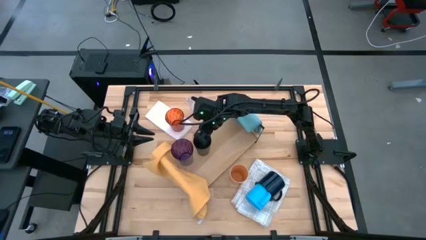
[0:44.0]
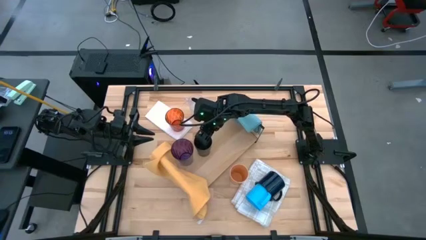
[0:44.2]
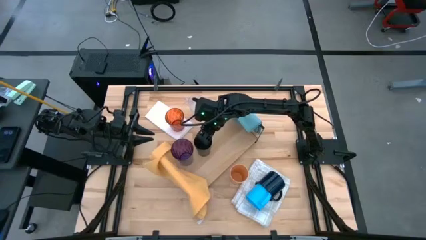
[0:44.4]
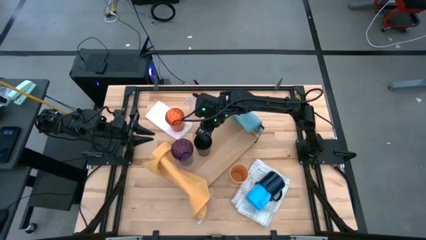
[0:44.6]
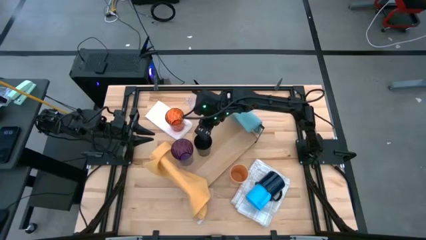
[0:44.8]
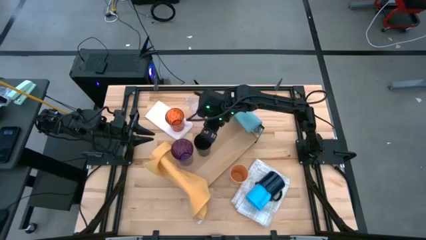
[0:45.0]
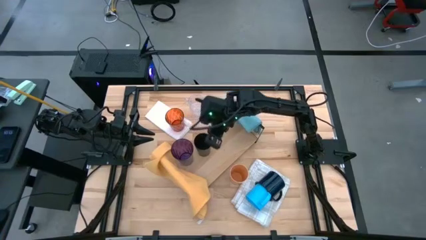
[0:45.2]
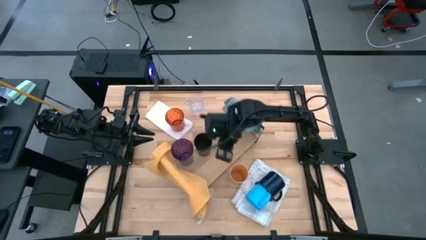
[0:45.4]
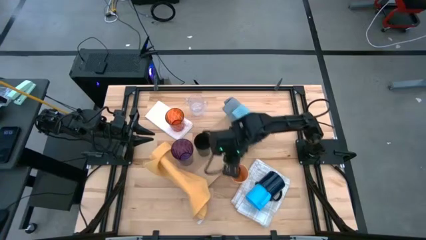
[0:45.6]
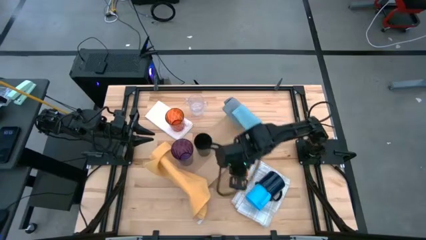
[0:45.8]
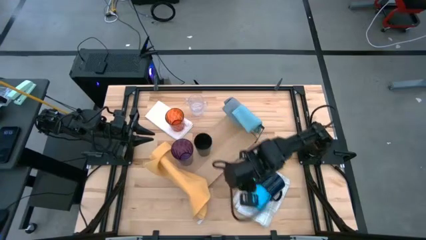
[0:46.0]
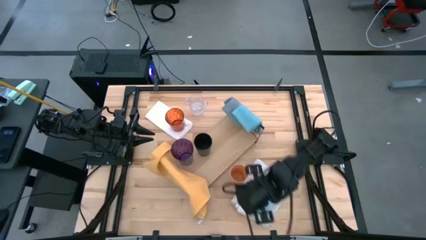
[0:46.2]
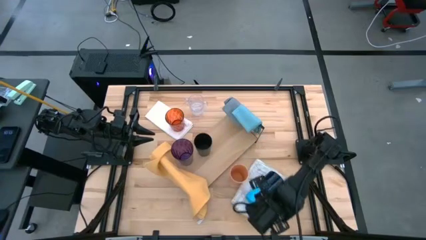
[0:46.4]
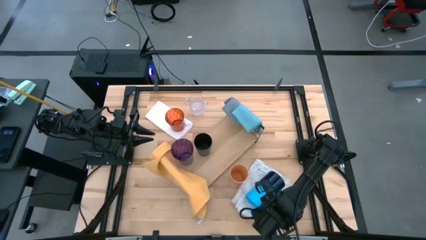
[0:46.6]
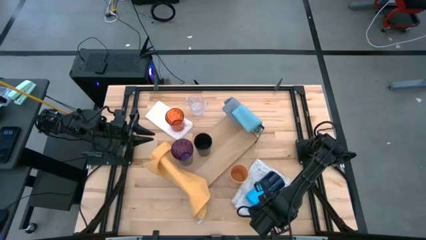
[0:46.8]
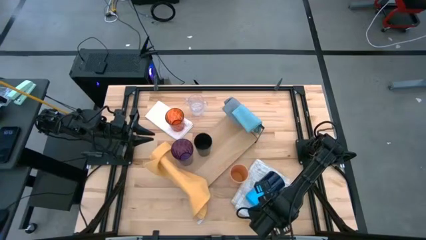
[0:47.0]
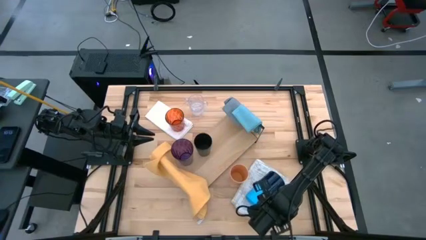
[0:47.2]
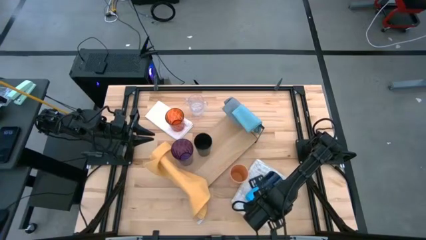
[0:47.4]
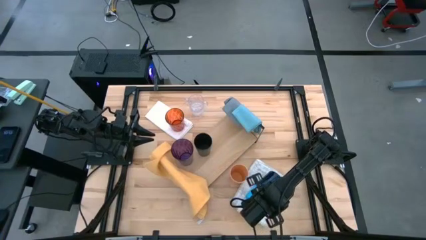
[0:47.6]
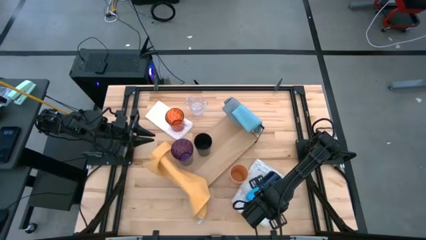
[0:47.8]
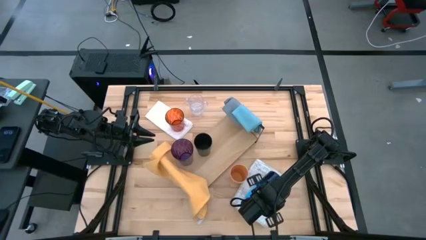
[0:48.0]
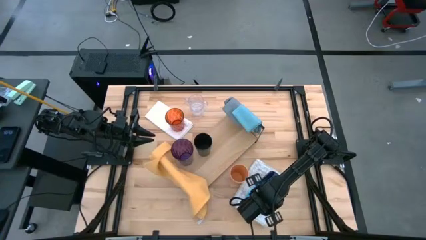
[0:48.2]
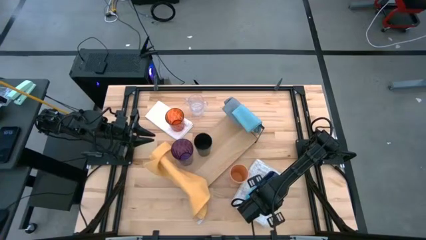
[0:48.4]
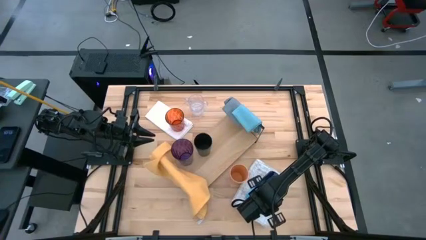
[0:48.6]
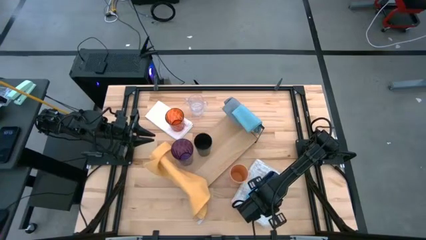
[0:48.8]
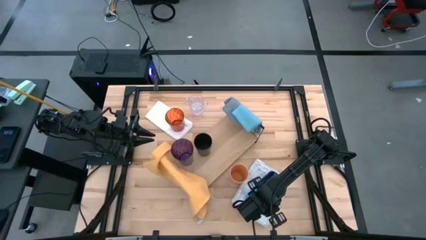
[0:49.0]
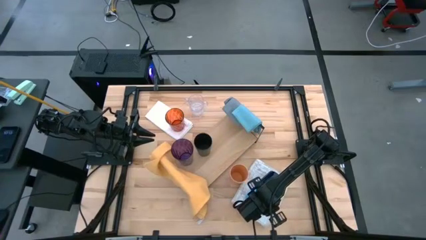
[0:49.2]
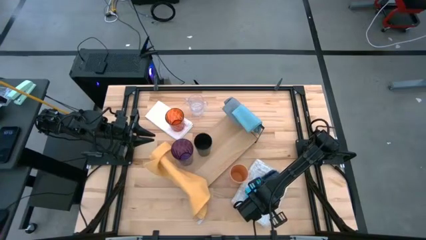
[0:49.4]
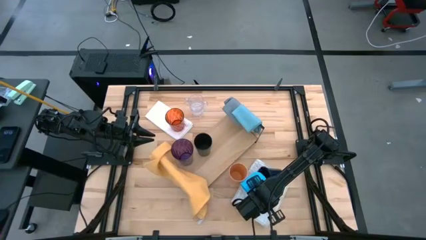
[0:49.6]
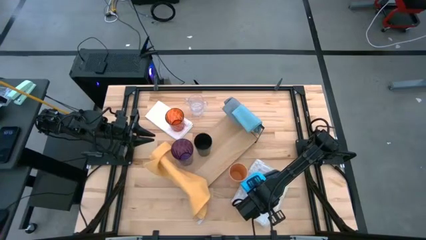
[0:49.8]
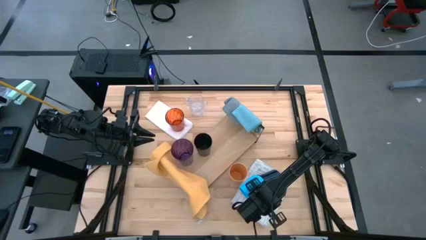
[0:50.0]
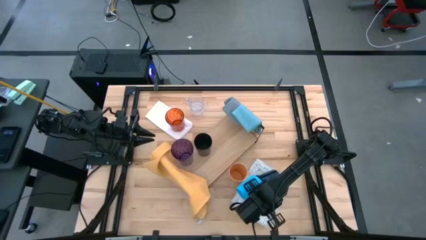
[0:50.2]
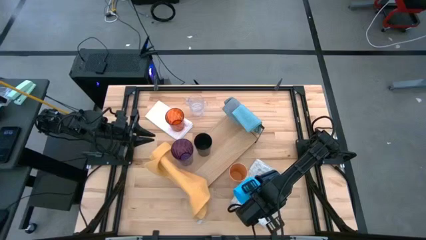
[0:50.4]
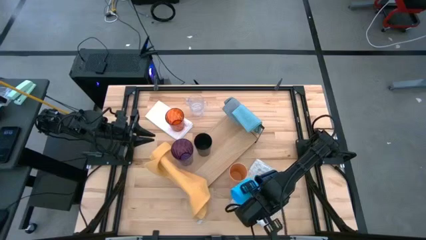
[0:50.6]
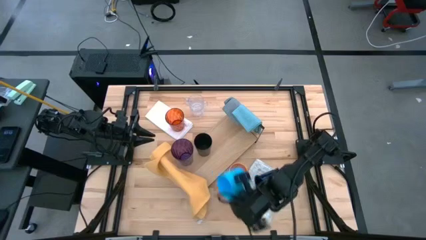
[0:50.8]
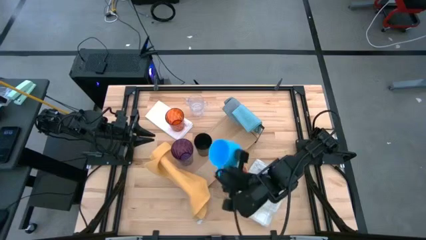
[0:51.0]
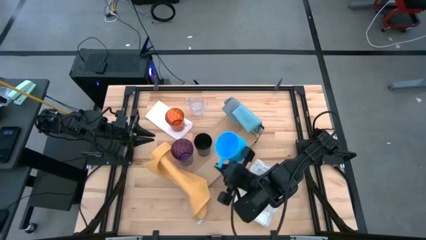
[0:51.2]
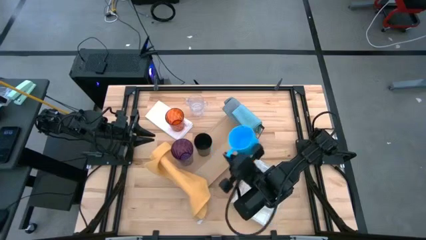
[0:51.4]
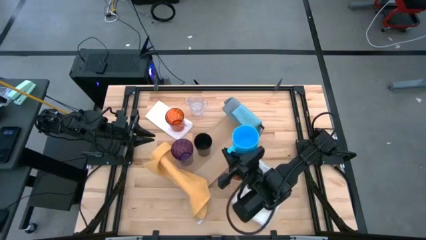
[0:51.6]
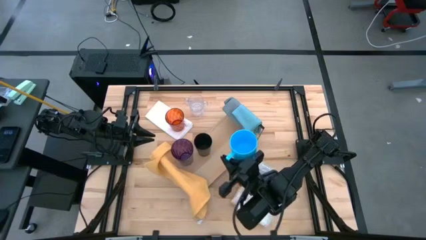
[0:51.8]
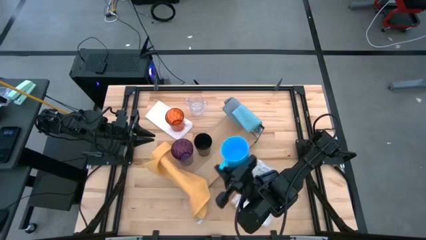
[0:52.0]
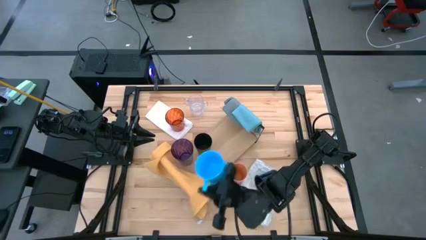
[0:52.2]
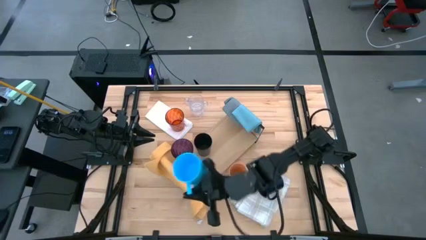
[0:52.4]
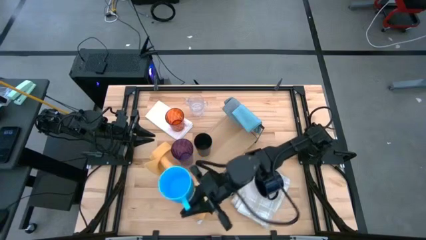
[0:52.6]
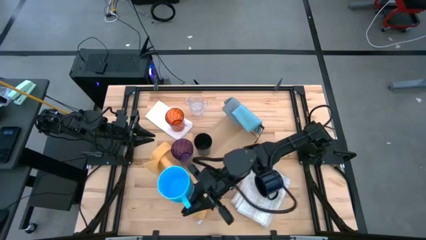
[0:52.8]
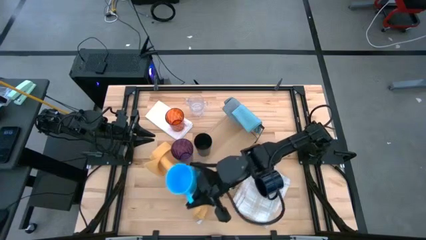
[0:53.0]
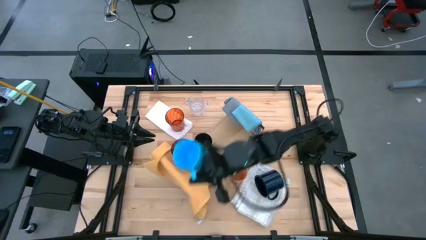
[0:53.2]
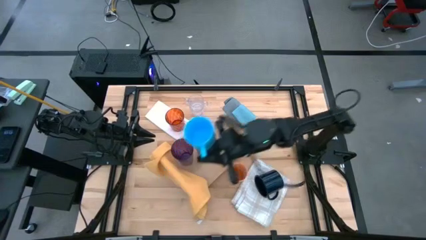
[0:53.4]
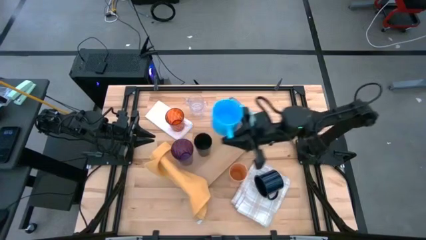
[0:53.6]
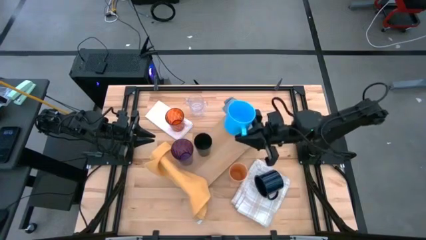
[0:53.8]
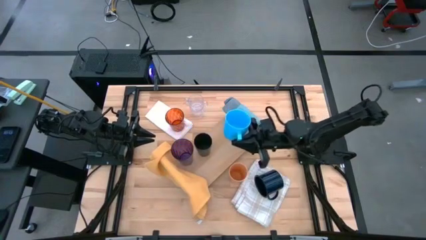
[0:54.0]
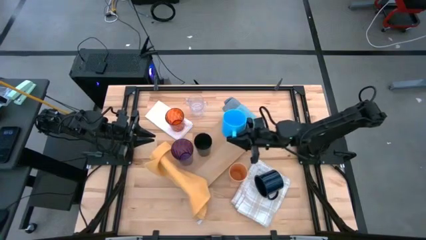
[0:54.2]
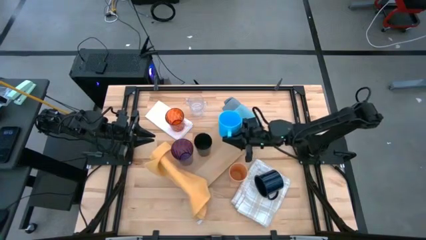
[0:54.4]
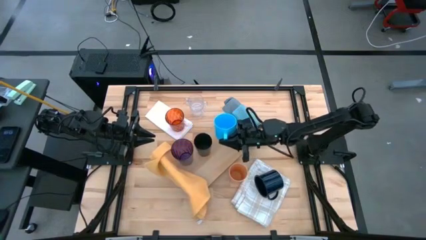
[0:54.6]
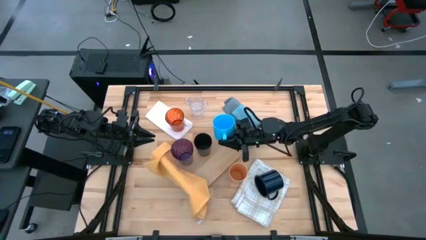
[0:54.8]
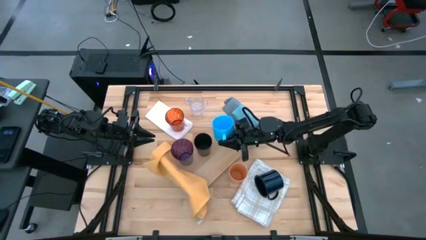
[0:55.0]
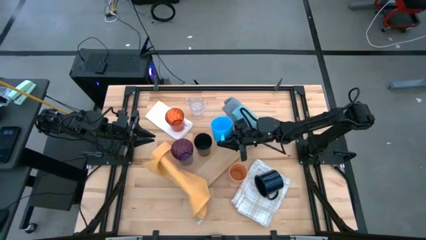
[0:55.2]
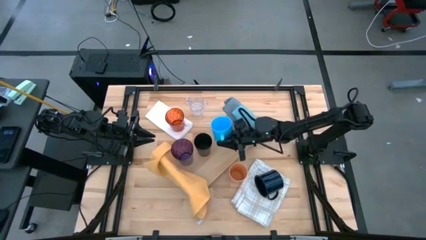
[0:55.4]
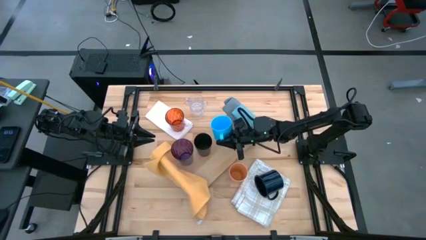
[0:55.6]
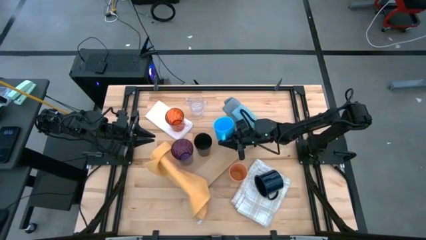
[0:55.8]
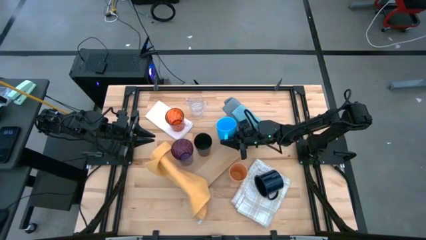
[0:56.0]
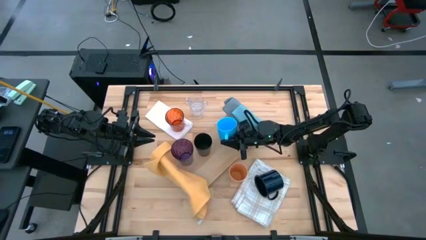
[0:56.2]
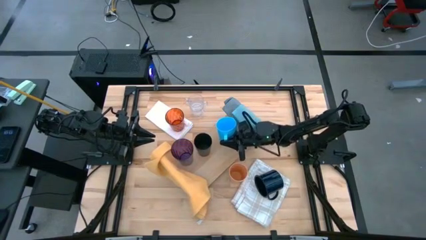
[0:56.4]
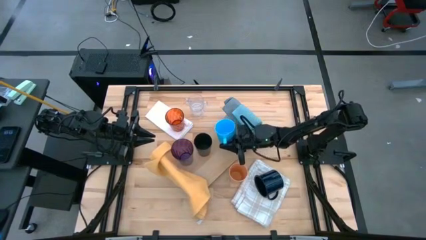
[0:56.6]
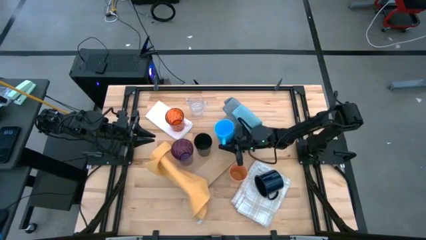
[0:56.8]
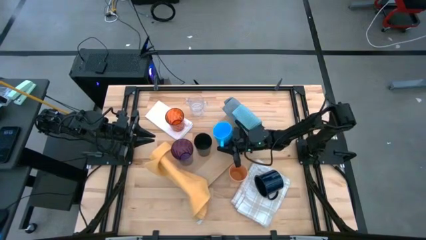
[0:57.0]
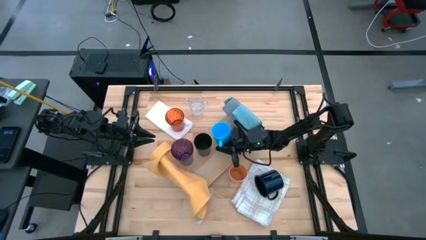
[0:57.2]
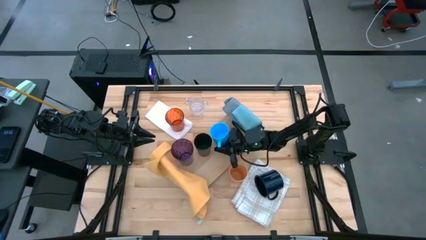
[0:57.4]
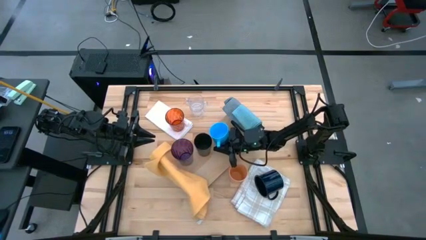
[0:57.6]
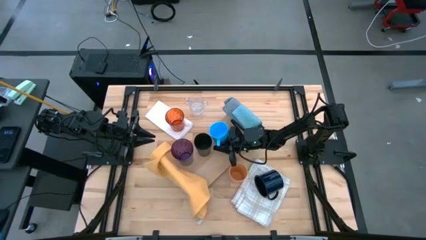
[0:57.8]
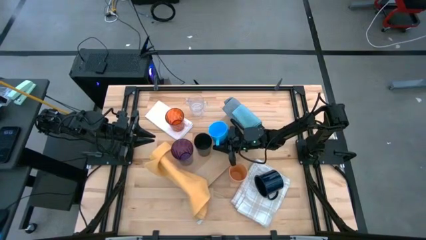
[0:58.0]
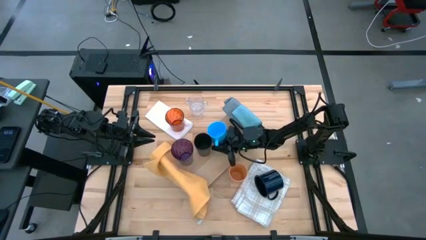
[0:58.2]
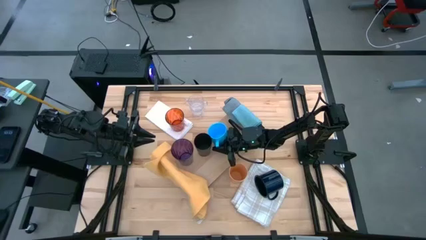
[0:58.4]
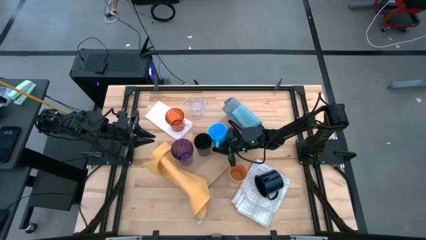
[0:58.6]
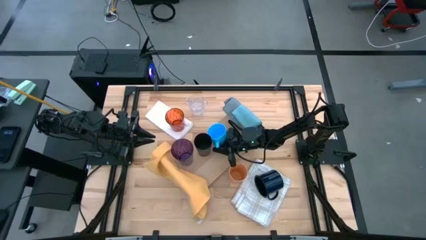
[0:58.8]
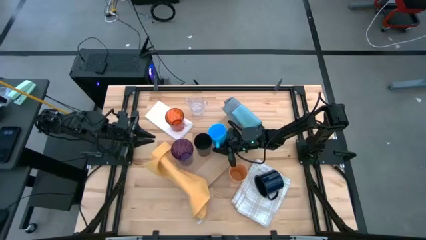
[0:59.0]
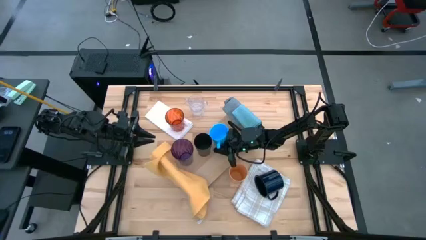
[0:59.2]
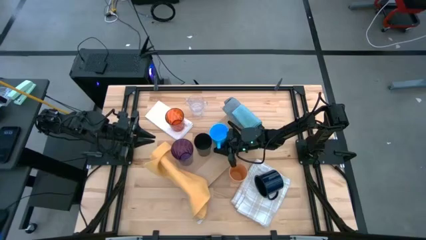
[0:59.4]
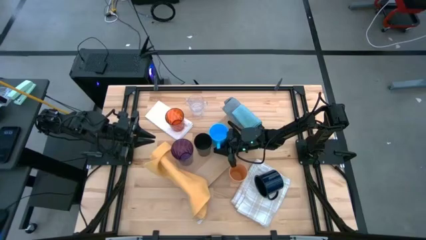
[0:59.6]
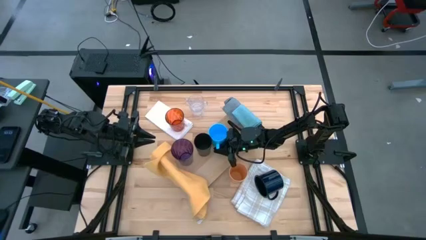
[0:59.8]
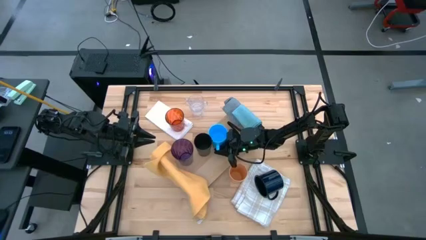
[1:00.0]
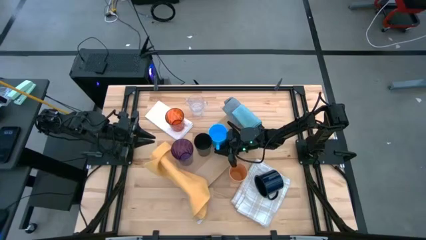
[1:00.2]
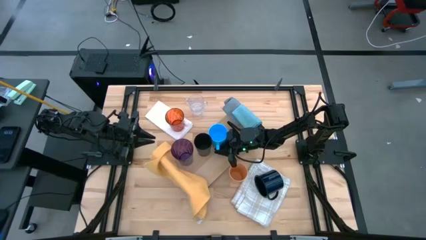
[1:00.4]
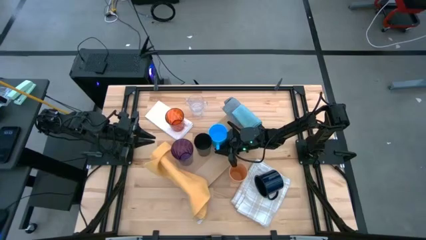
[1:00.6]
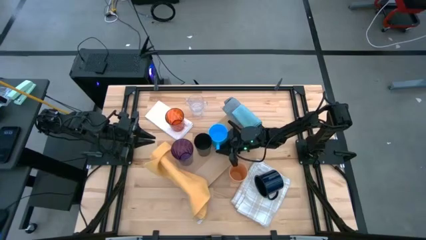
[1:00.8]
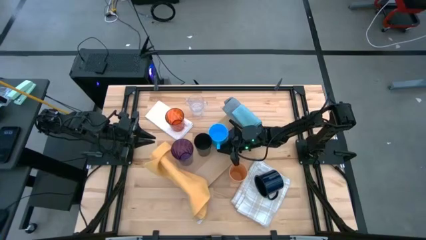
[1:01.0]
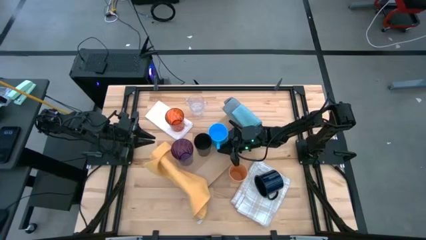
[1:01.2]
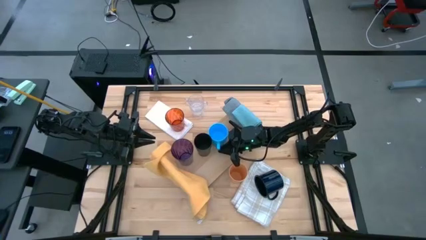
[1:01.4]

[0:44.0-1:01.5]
Task: Stack small to large cups/mugs on shelf
Put the blue mug on the shelf
